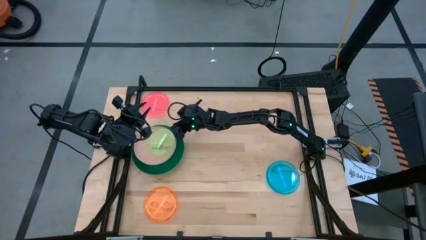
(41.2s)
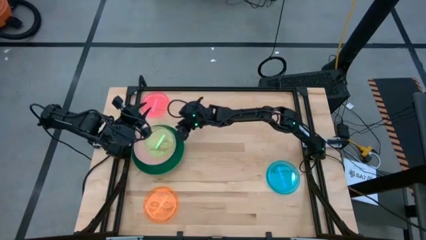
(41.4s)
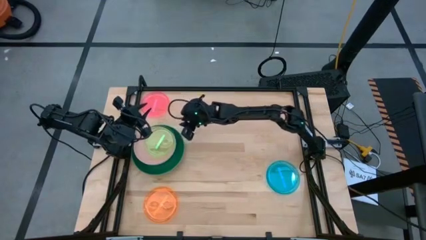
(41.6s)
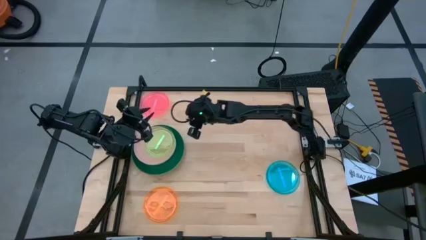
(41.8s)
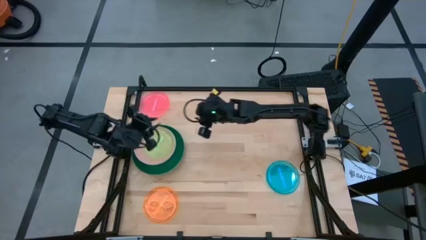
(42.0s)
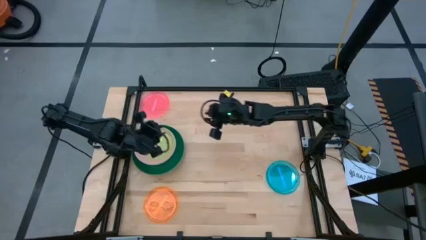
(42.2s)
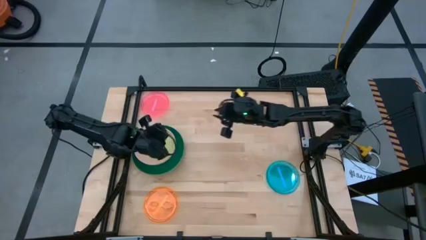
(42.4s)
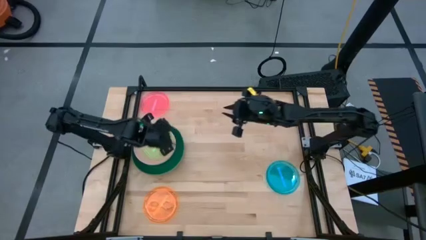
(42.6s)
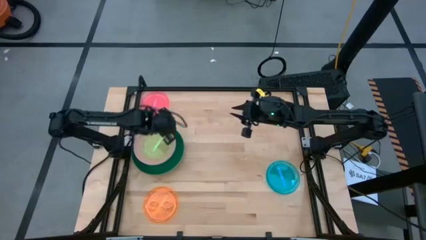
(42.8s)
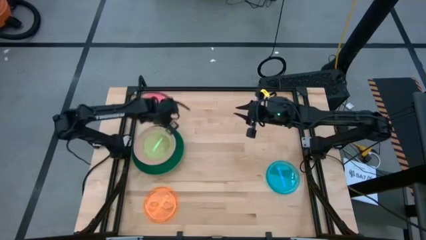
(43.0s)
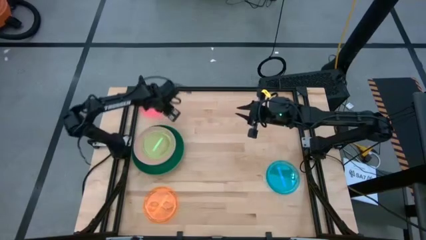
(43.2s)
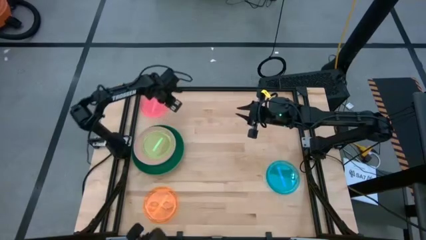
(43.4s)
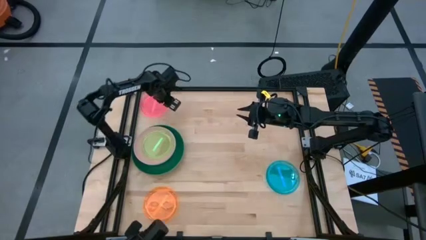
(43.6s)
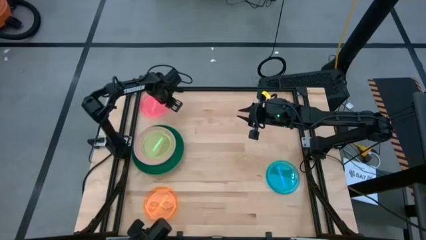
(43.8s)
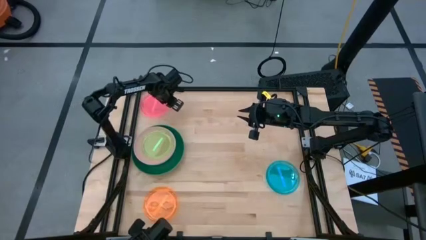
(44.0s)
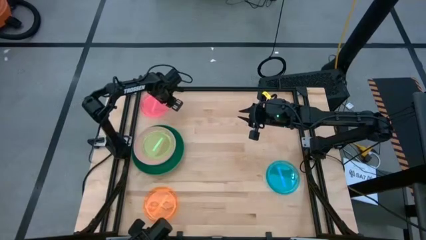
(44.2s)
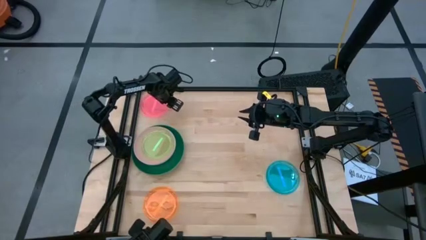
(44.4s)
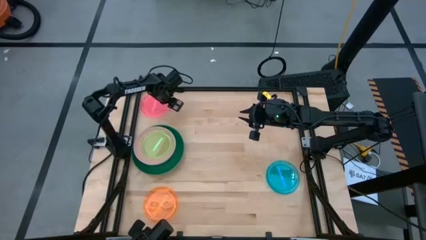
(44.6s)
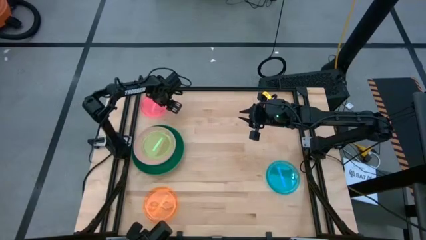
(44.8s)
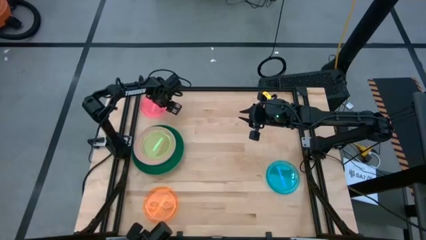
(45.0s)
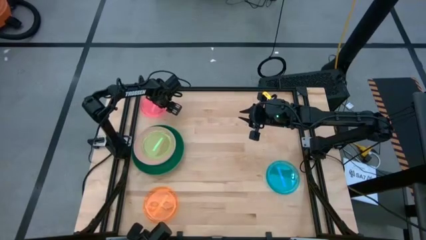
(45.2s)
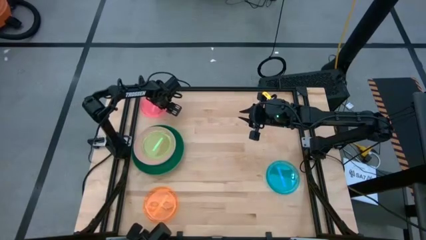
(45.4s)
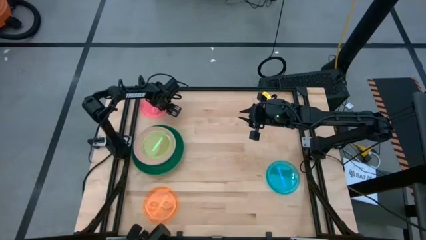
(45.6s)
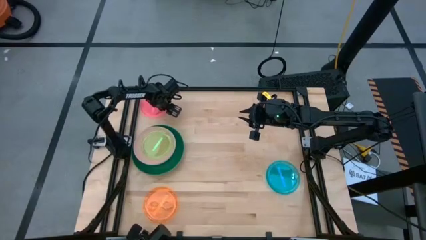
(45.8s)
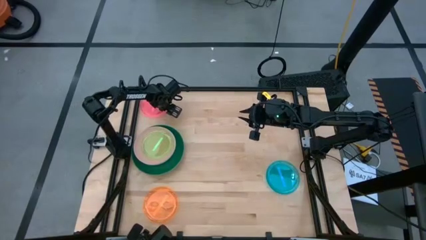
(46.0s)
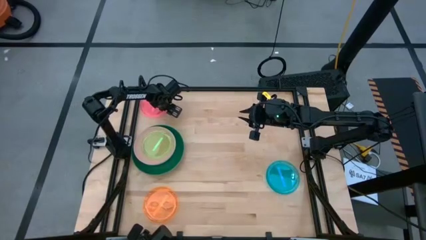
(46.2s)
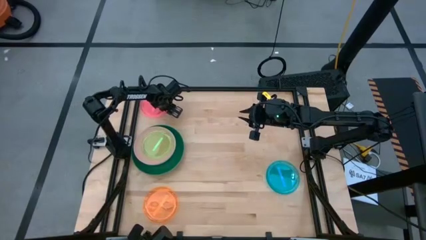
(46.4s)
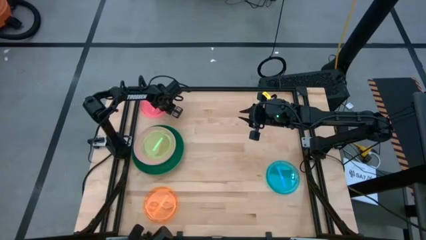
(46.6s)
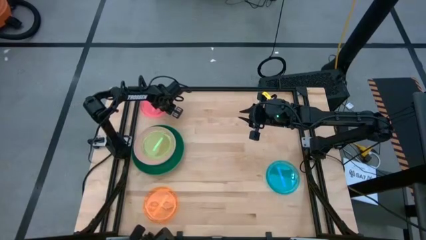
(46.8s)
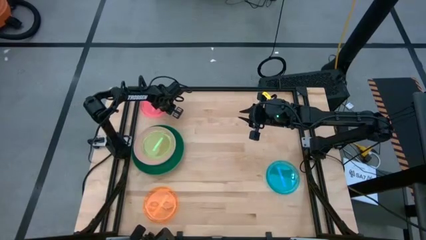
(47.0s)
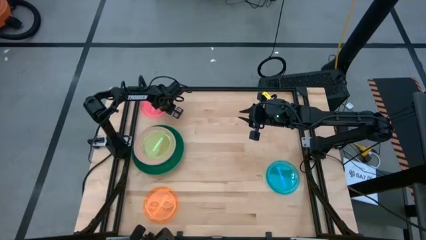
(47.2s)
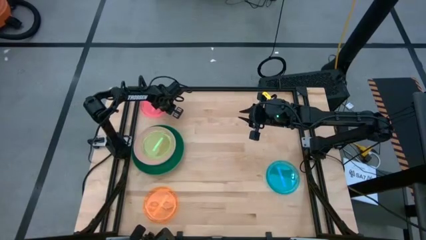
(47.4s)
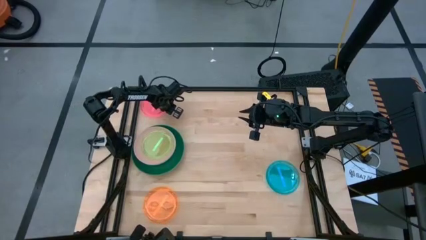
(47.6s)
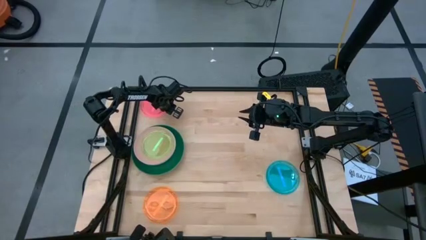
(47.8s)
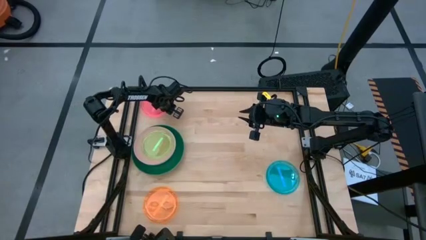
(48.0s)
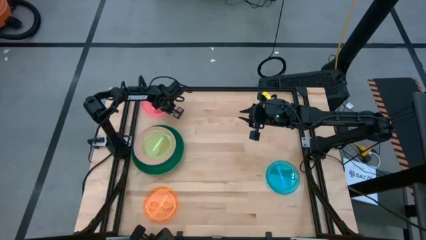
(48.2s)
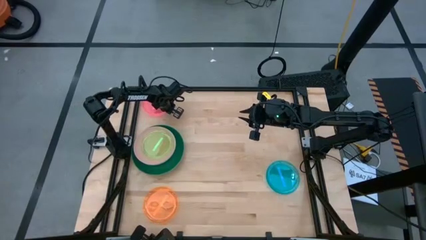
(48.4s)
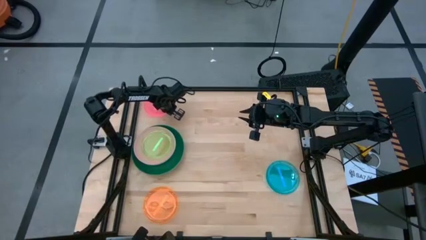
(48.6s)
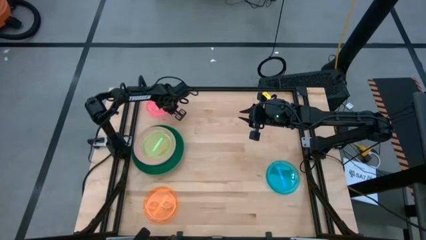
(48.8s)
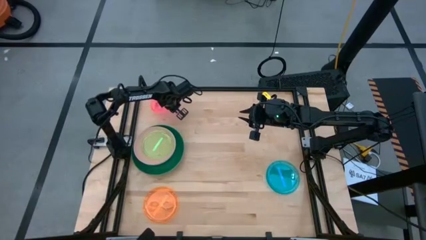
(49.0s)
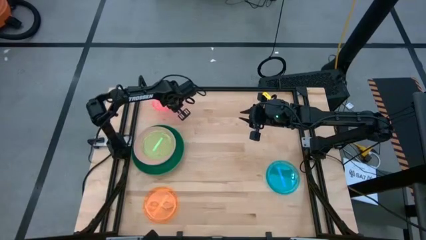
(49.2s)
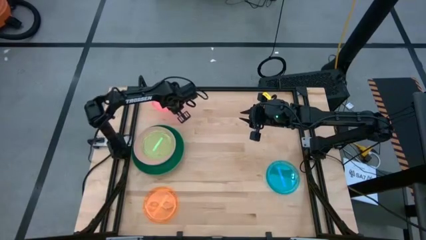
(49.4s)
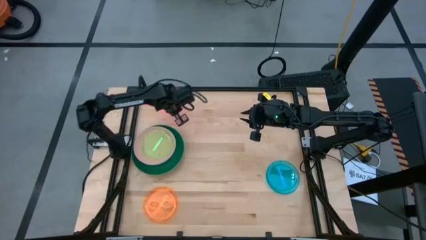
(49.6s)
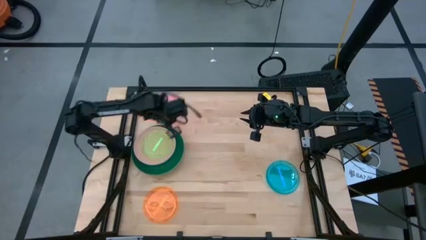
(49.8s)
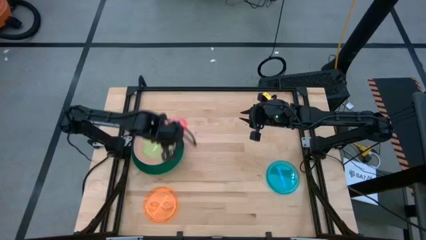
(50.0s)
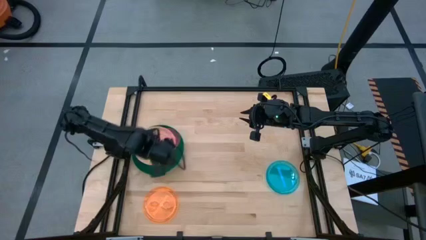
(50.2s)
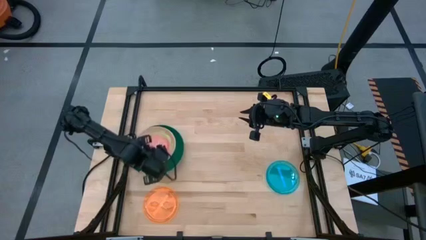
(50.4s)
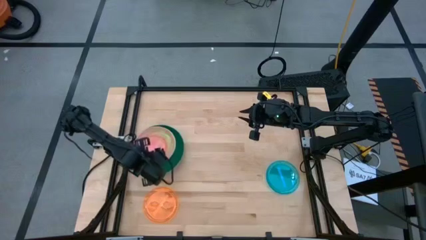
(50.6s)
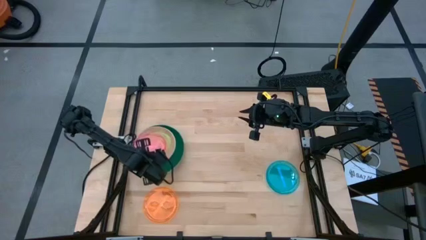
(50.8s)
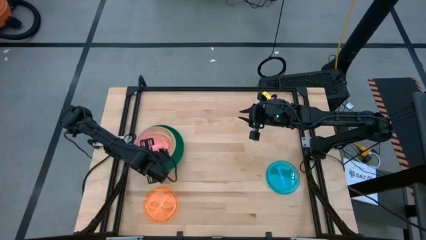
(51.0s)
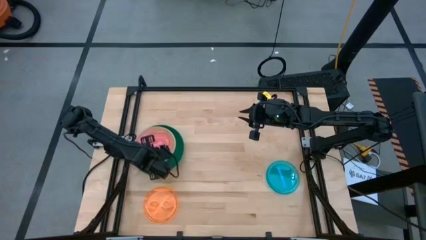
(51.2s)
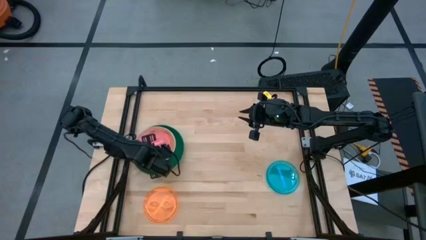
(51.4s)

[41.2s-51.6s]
Task: Stack plastic plates
Stack the pink plate on top of the green plate

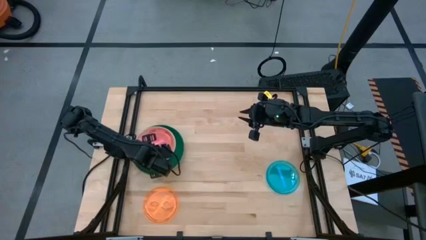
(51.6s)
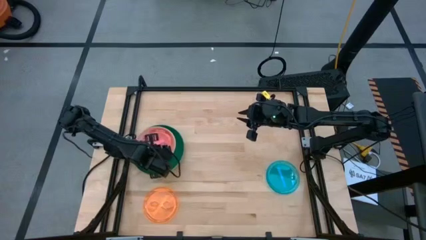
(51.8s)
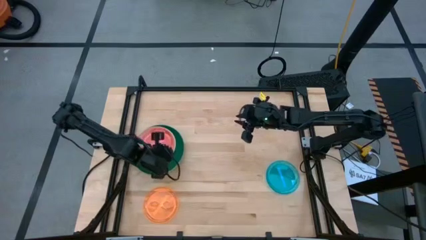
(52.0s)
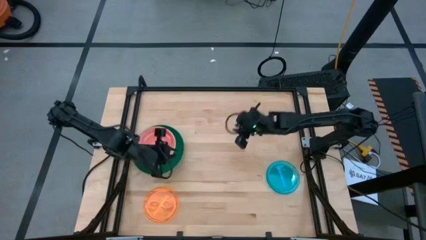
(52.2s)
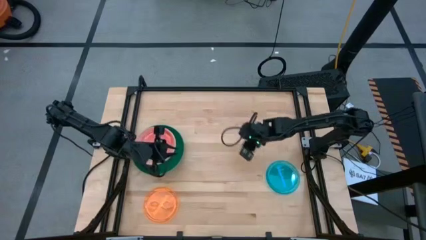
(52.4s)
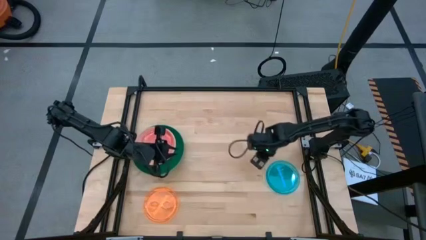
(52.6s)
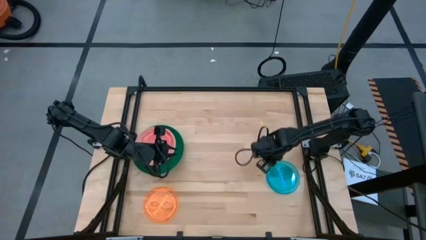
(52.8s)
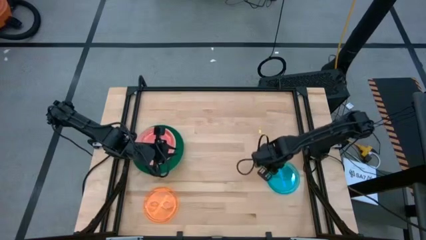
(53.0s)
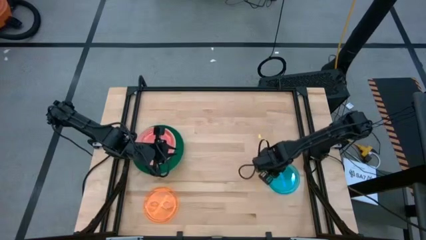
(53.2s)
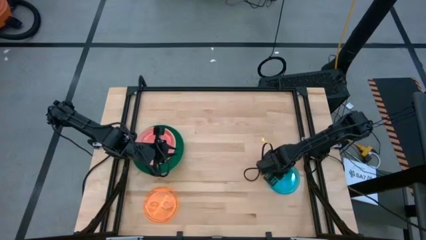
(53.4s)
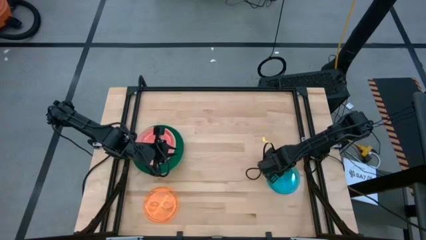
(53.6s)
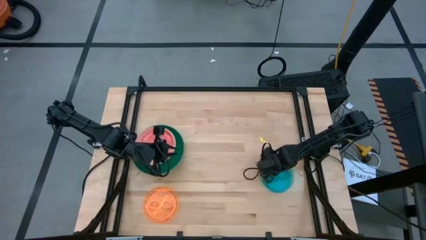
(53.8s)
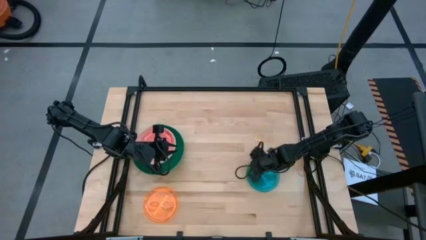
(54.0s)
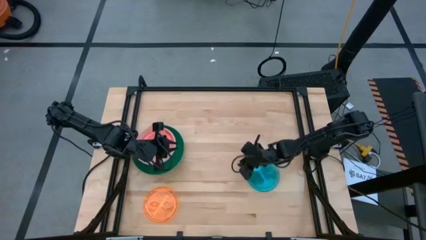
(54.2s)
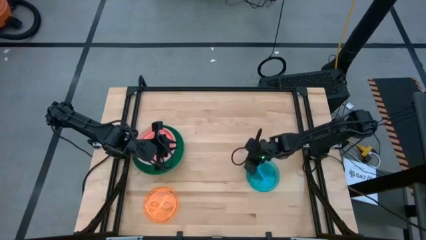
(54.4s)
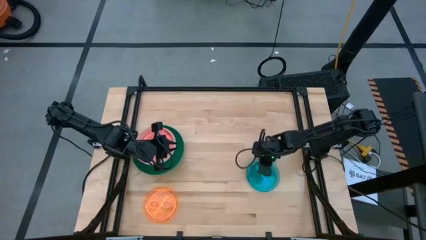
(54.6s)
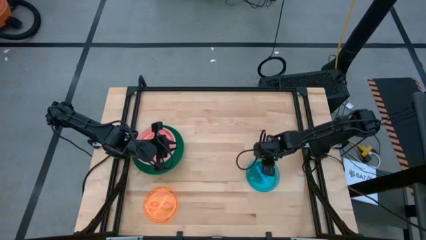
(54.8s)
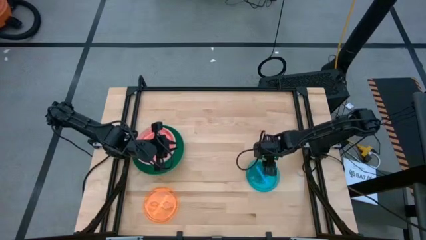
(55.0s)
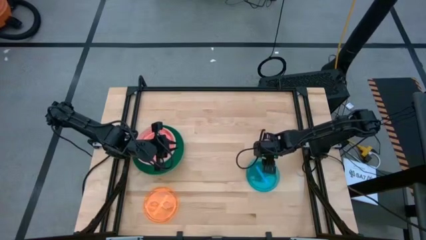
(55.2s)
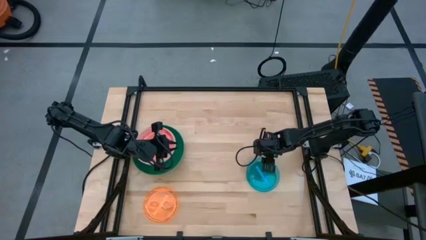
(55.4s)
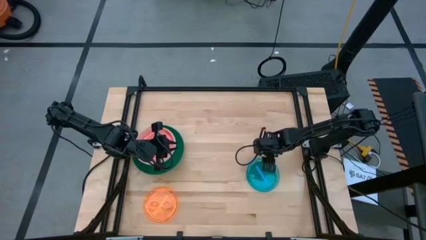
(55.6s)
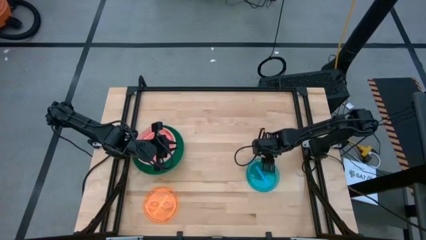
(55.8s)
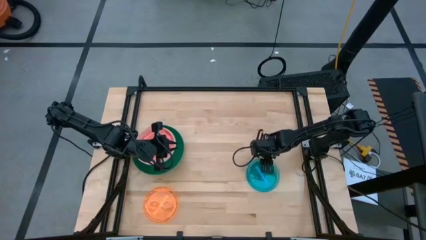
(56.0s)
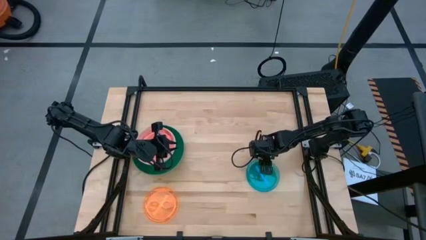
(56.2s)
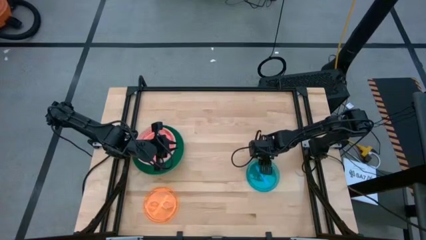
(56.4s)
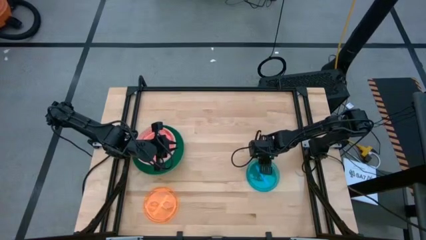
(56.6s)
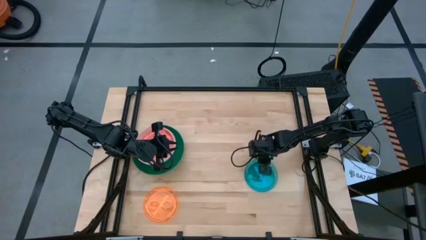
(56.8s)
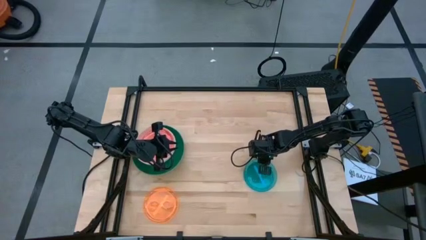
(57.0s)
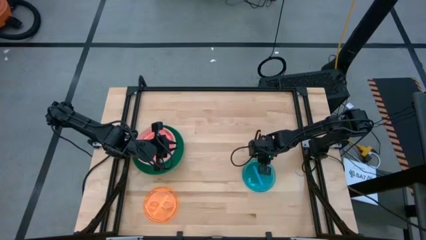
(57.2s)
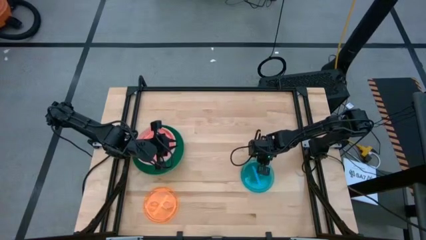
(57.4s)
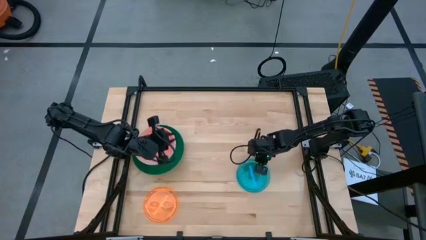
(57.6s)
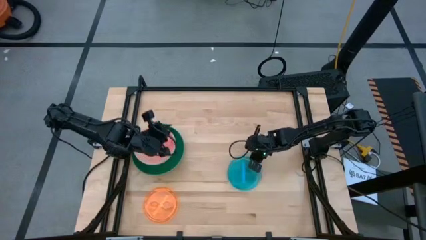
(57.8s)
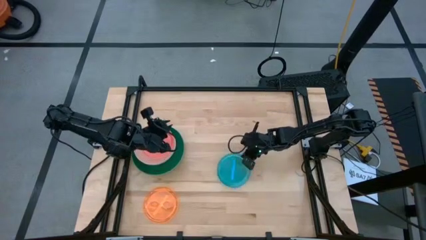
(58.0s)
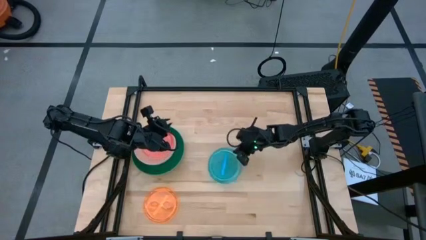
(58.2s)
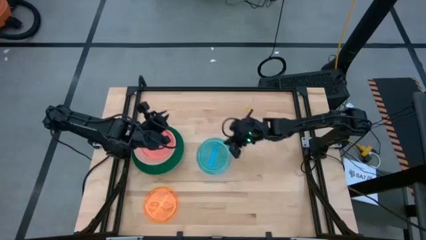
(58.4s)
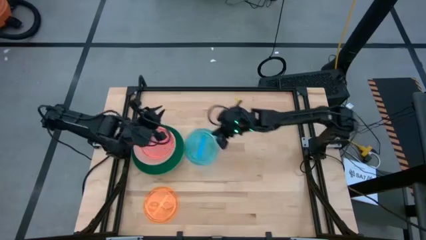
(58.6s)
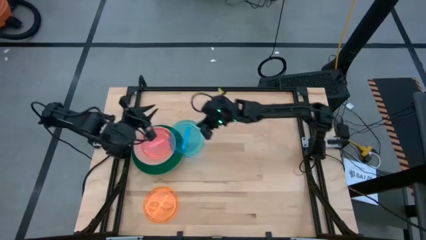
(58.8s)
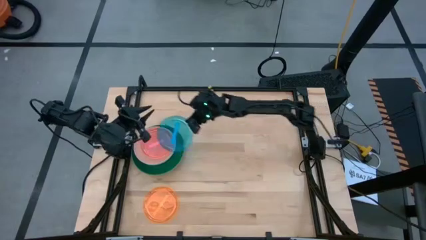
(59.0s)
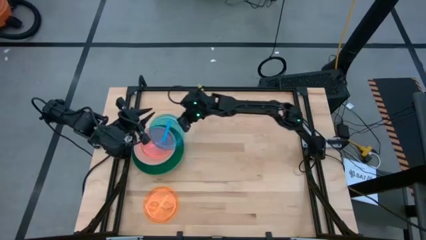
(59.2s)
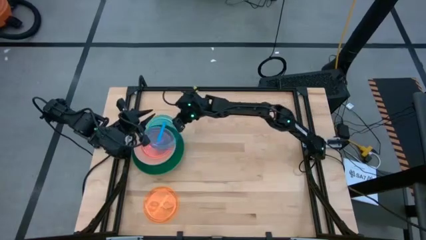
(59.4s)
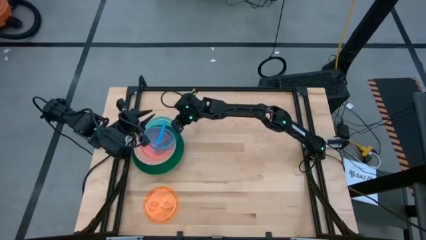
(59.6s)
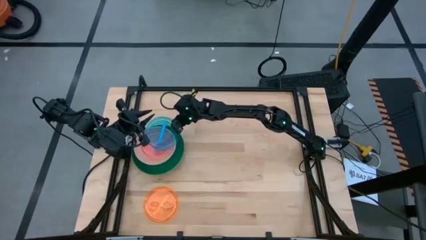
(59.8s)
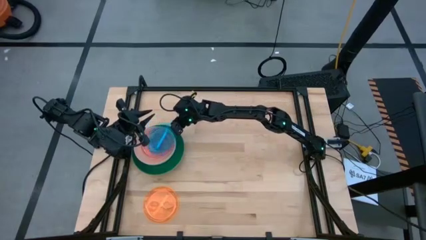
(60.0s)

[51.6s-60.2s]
Stack the blue plate on top of the pink plate
